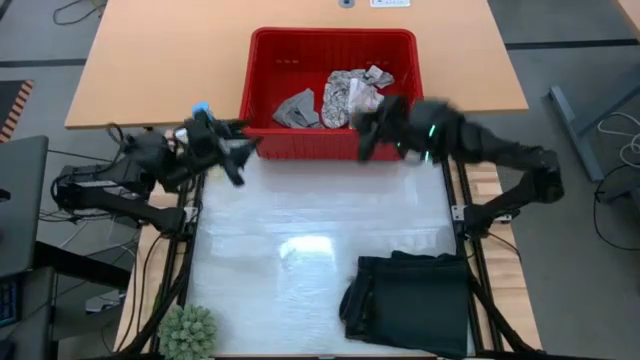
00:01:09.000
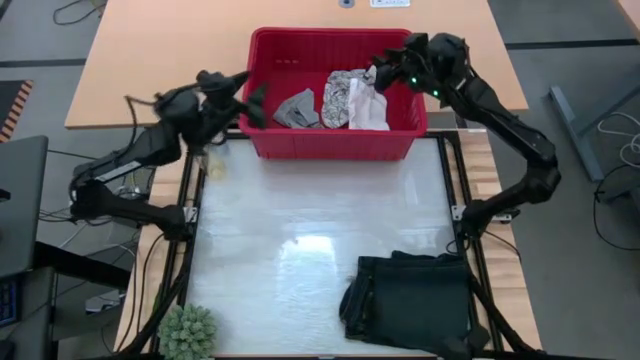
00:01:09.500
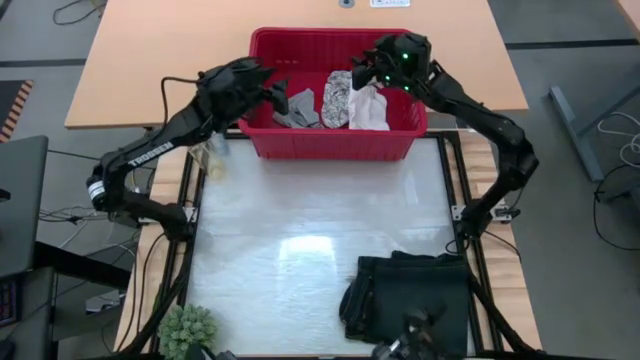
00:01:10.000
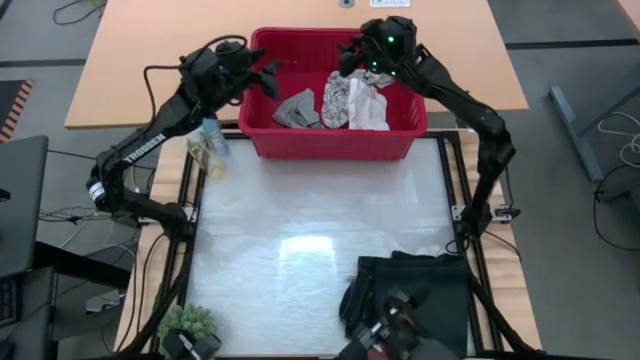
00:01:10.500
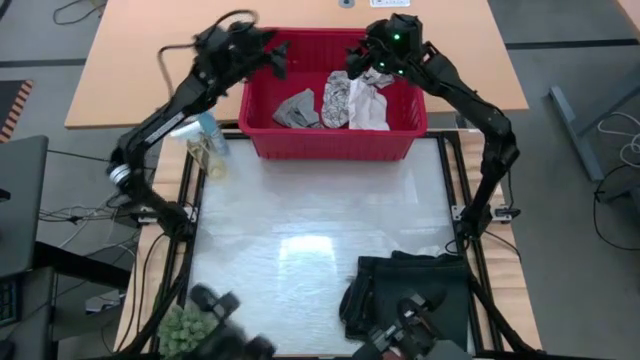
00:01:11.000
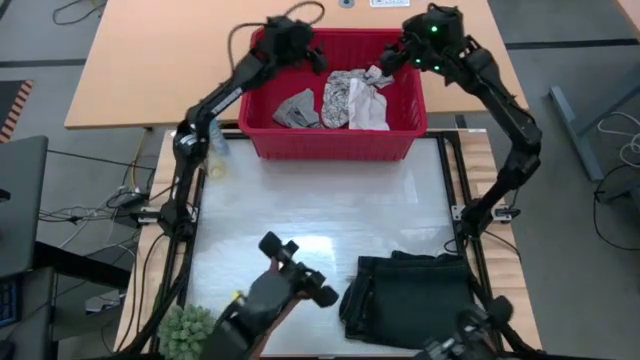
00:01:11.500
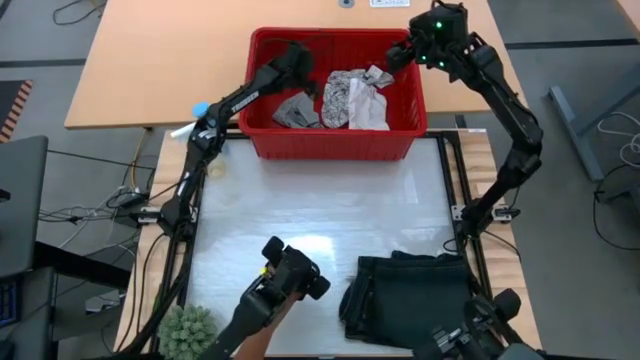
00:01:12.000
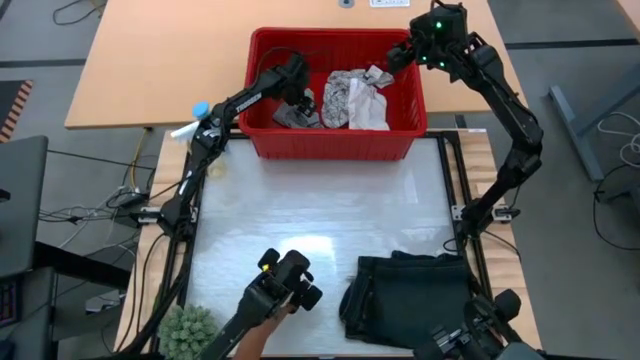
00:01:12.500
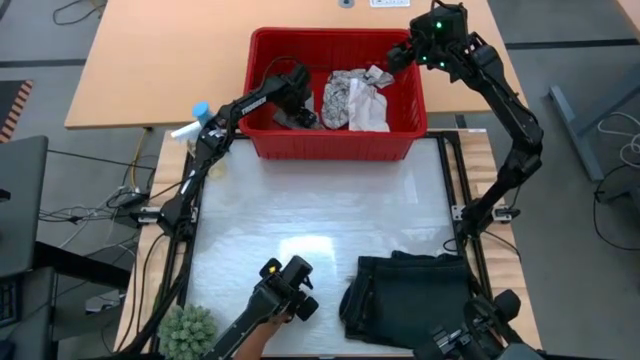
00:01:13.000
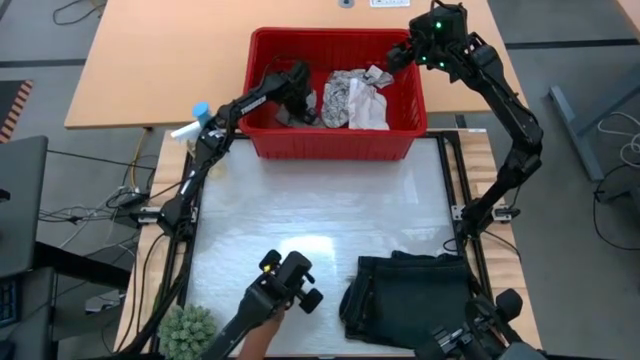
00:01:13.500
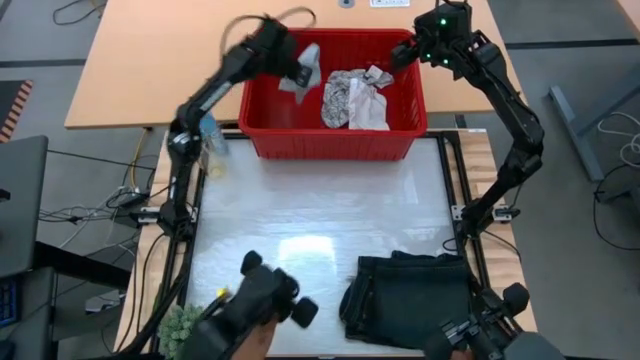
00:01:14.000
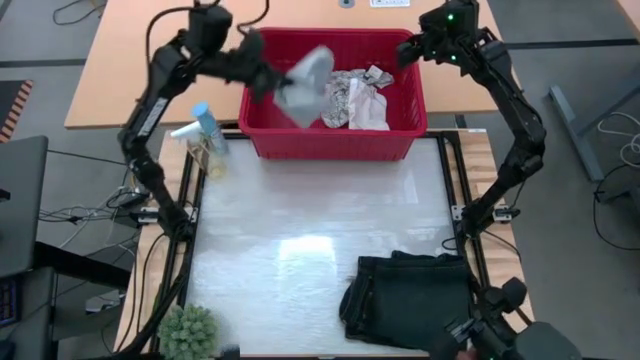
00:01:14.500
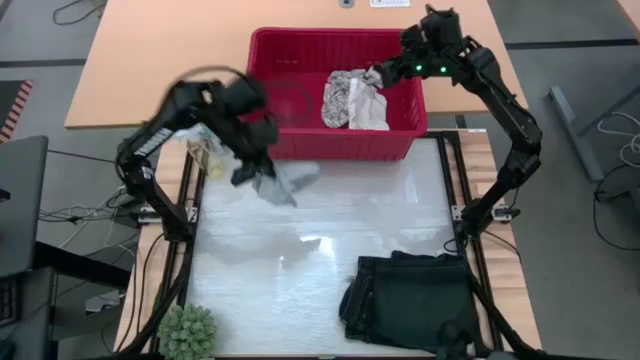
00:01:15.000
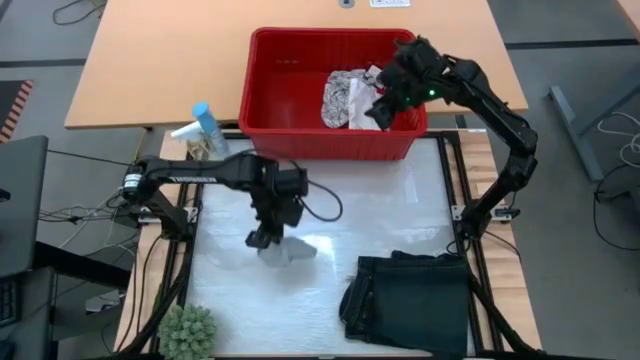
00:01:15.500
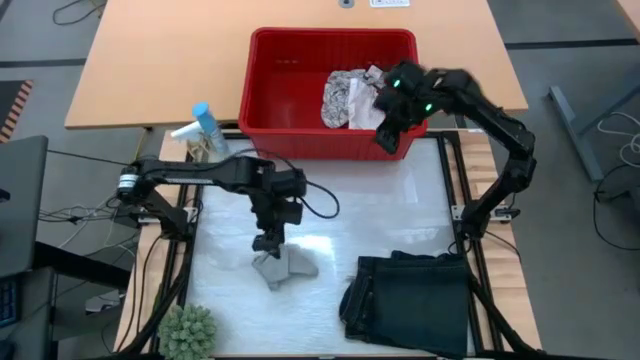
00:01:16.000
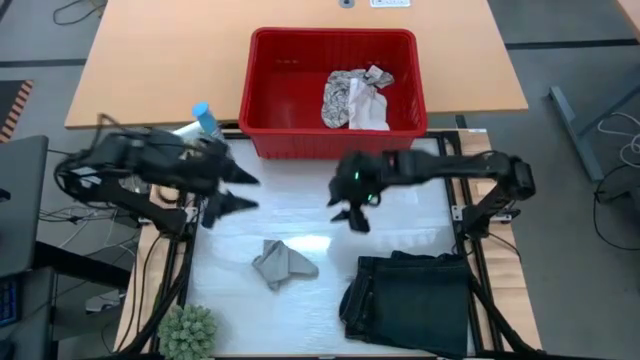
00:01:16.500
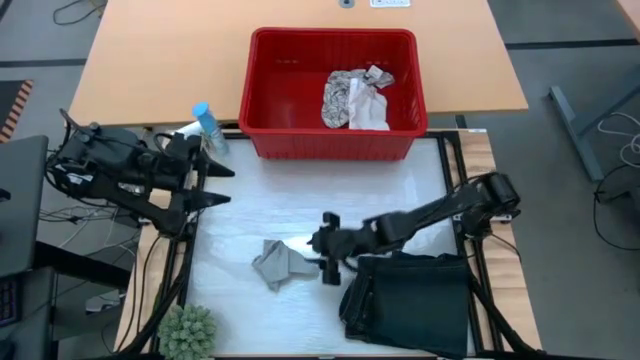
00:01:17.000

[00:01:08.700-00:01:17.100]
Task: Fold Laundry from Bin
Remove the gray boxer from the red laundry bin

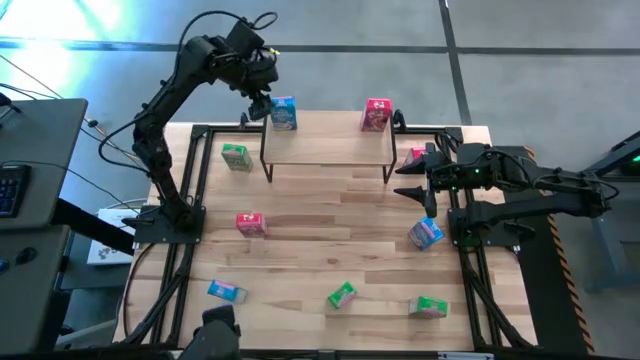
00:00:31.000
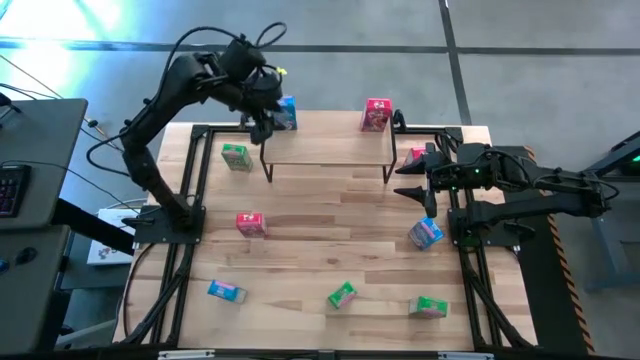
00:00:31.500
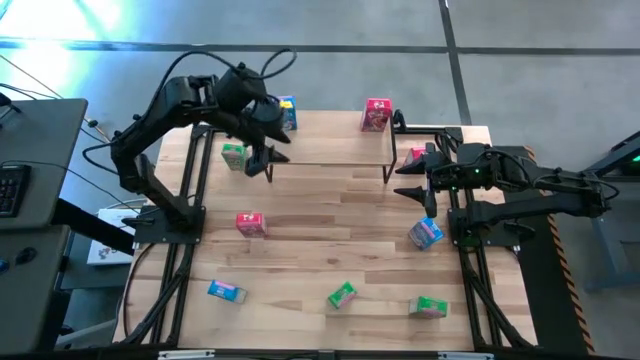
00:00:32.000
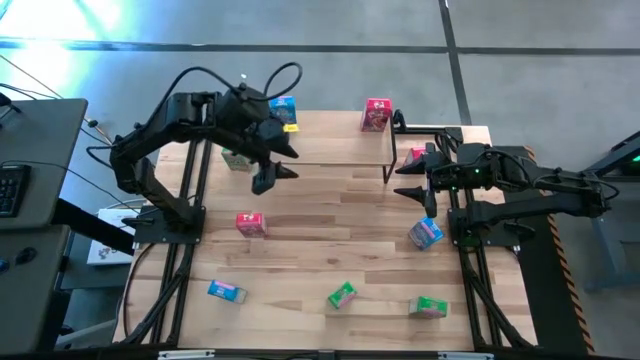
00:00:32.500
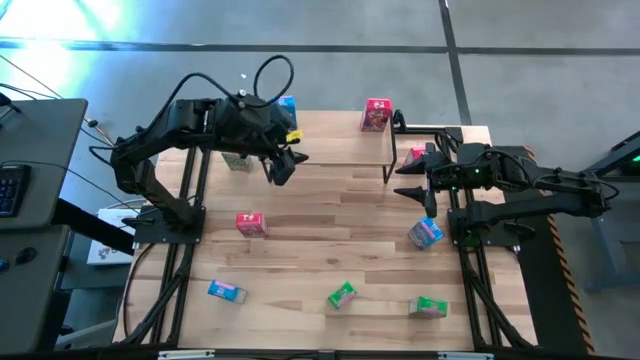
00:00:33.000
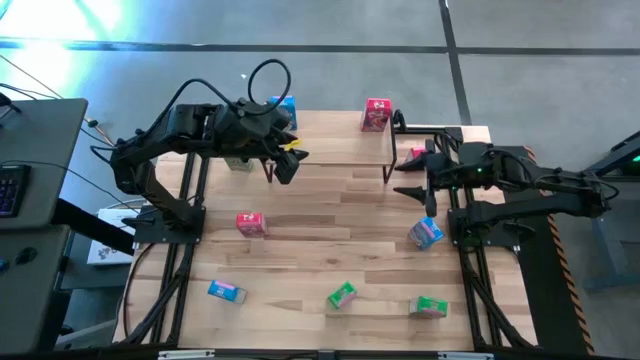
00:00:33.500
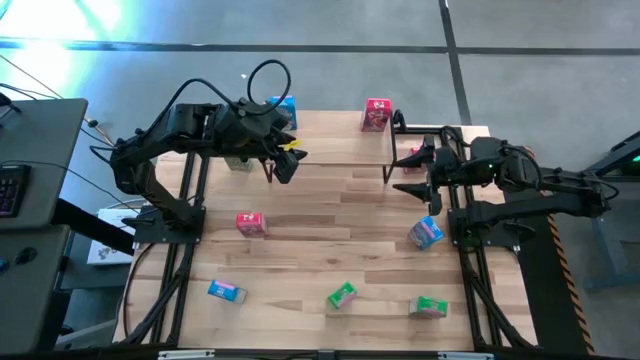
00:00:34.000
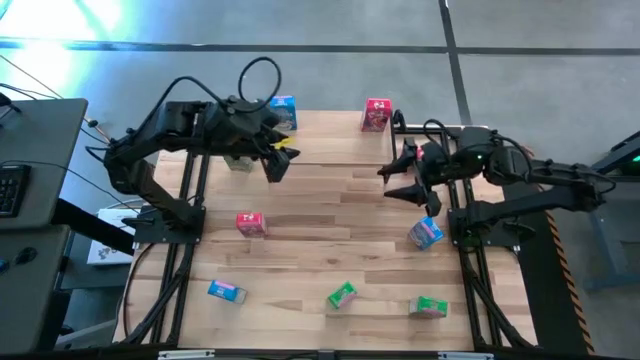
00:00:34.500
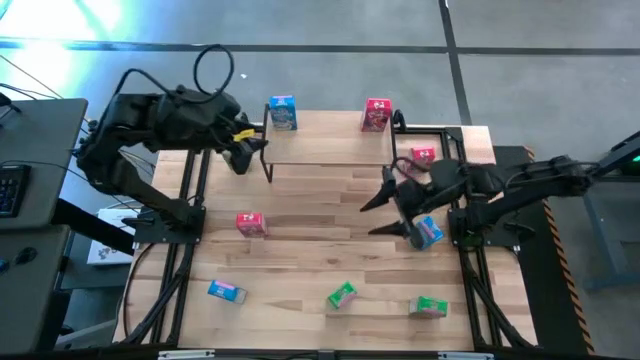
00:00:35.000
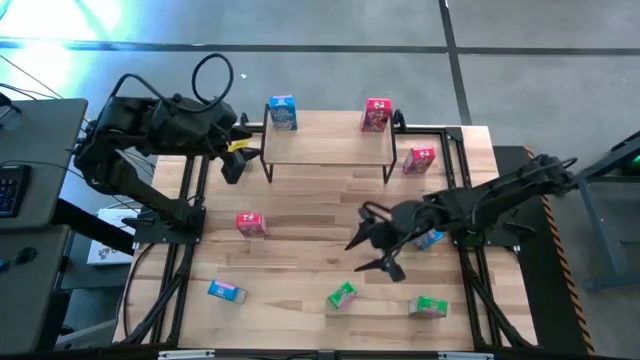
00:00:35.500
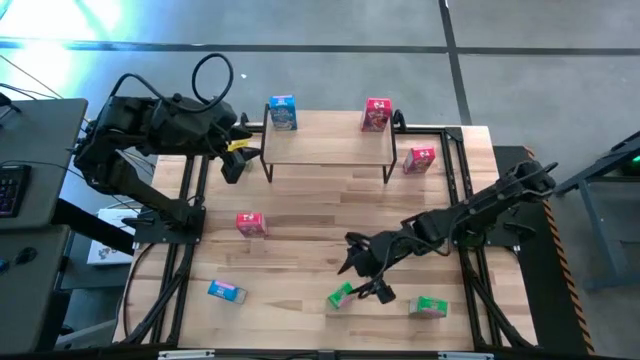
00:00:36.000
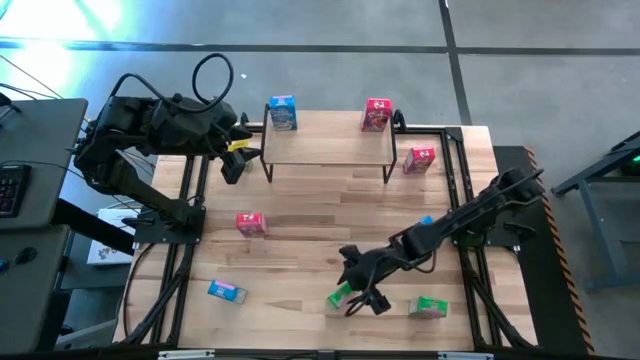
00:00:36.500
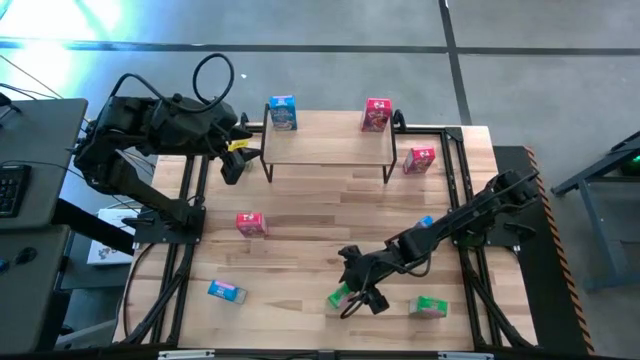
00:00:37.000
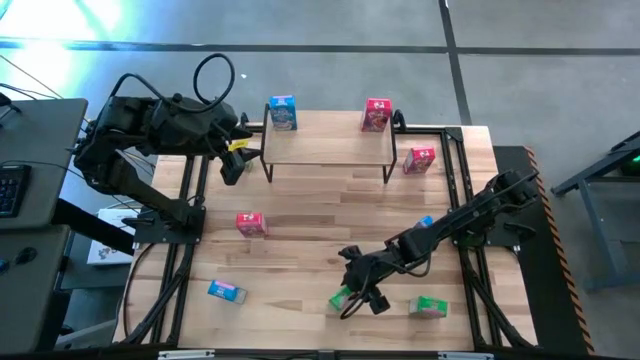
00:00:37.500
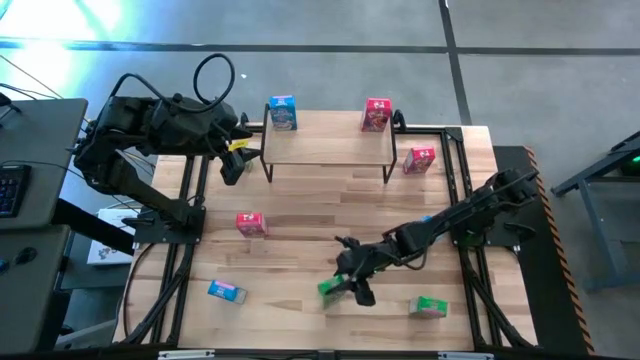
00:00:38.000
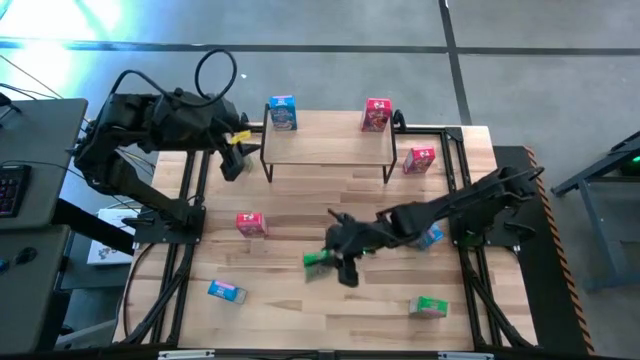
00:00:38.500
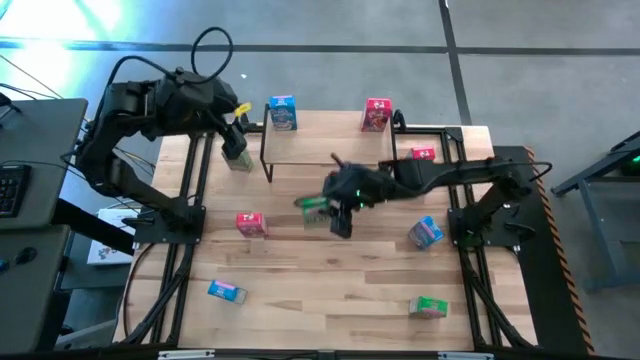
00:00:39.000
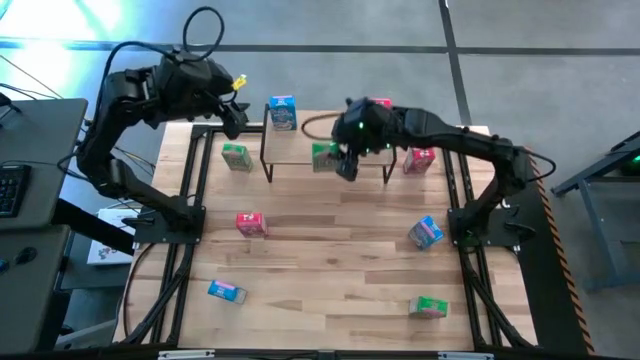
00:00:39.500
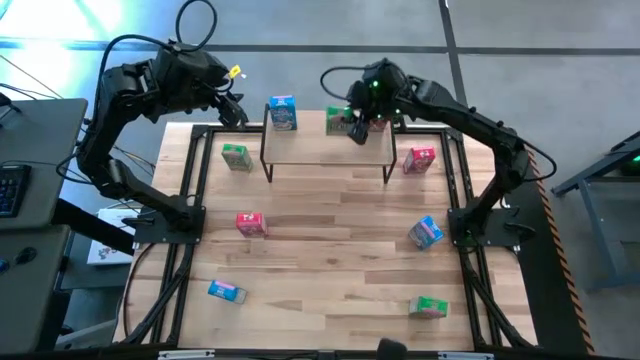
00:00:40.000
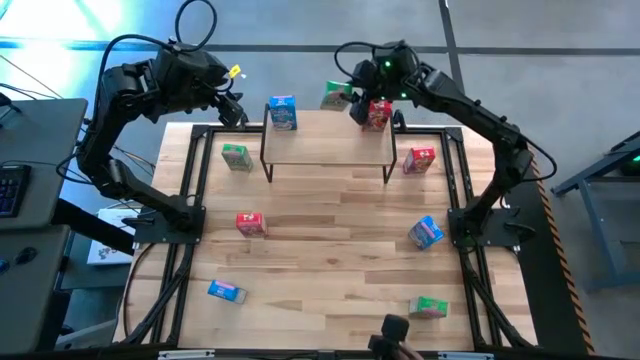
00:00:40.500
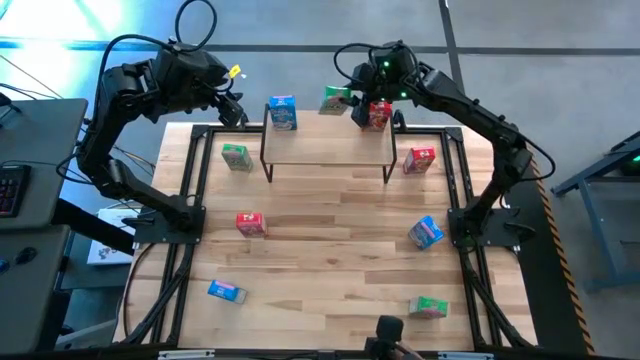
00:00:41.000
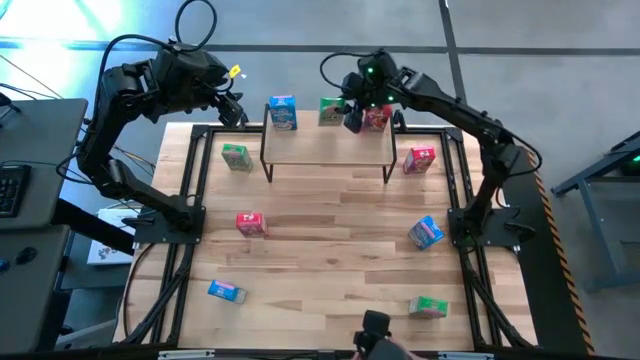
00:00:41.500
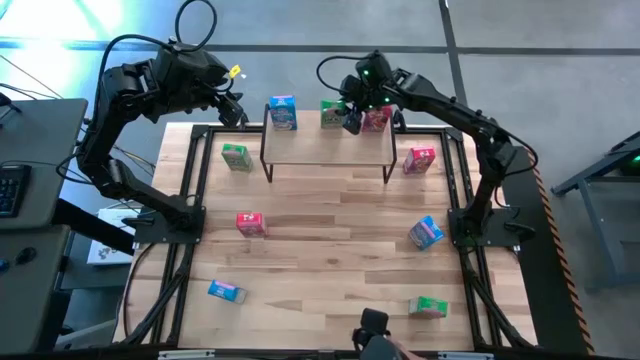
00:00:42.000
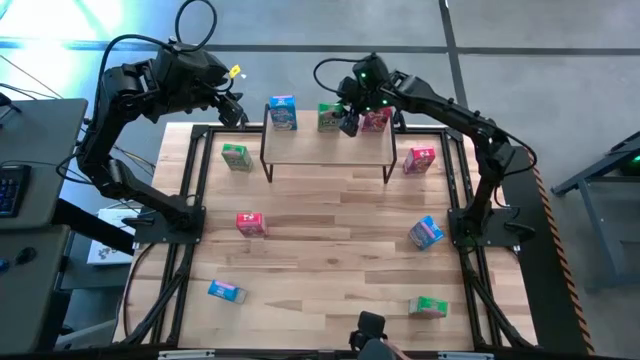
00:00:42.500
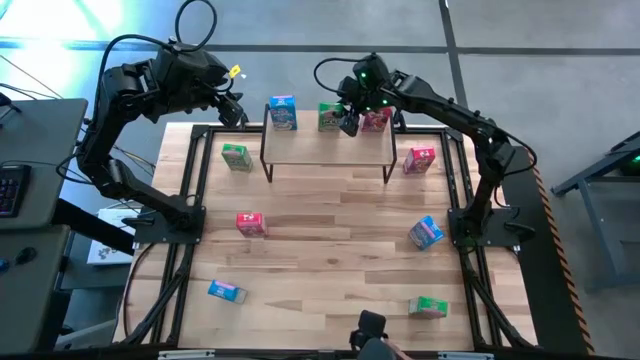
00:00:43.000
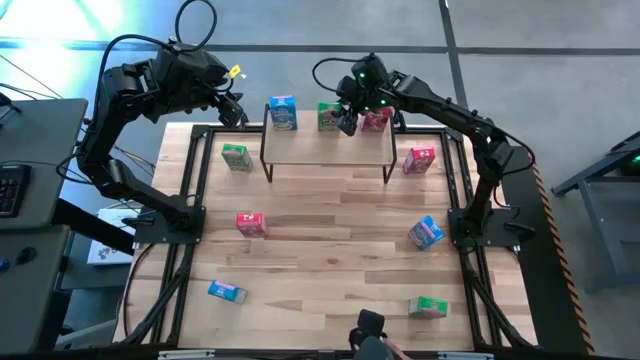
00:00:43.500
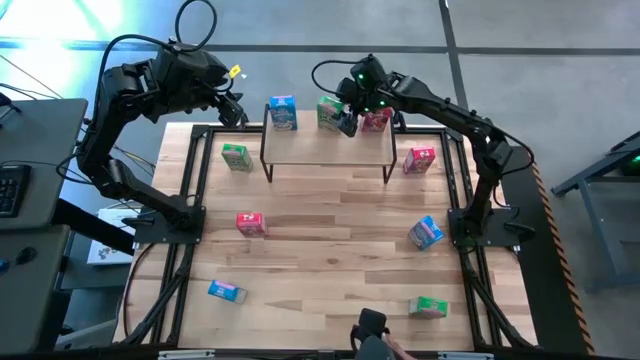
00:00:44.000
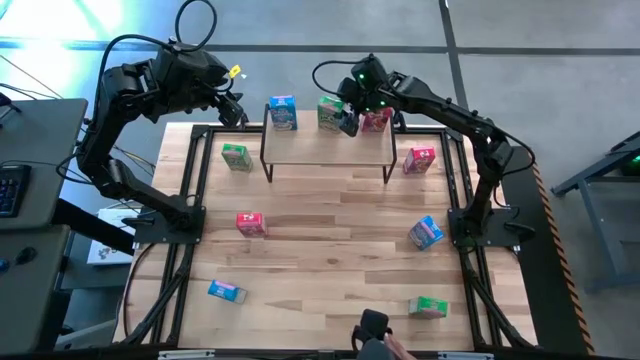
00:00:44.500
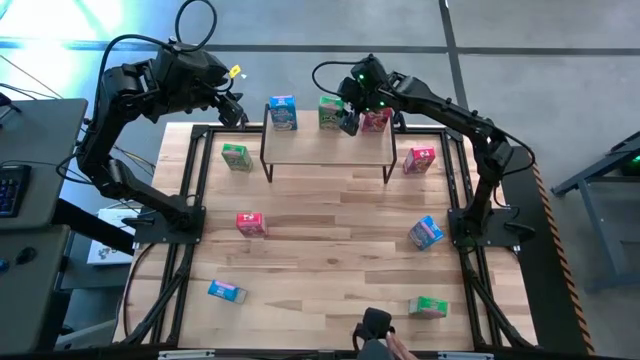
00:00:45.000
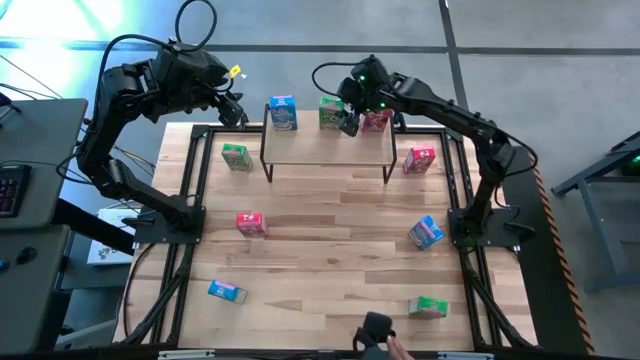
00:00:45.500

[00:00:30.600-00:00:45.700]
Task: Stack cereal on shelf
Put the bottom left green cereal box on the shelf
